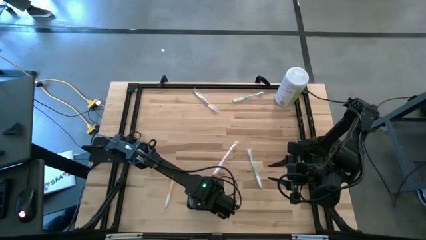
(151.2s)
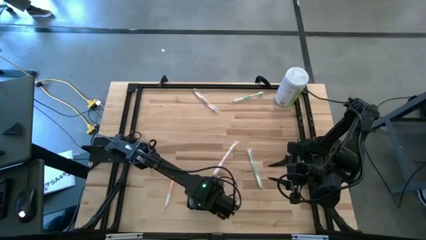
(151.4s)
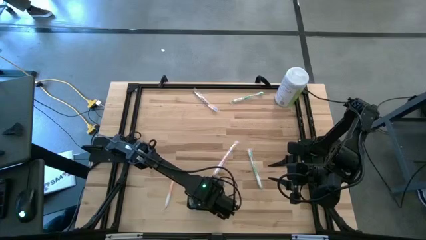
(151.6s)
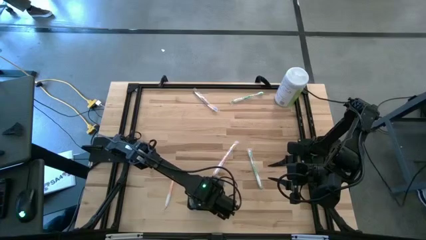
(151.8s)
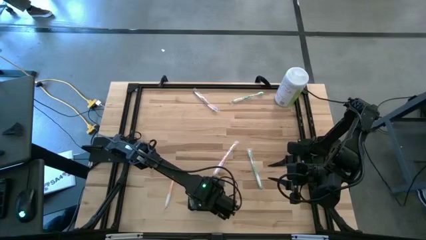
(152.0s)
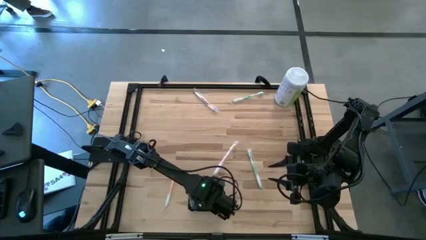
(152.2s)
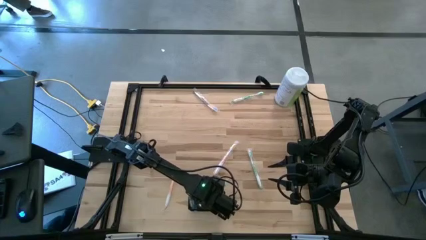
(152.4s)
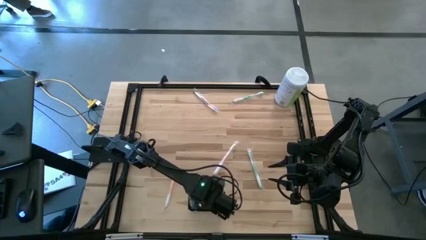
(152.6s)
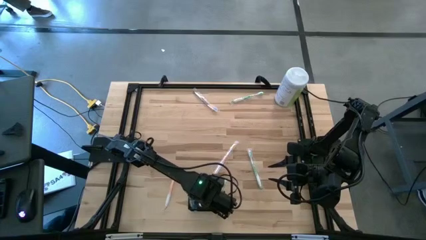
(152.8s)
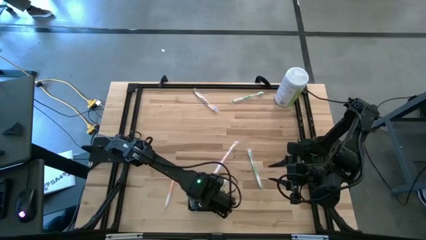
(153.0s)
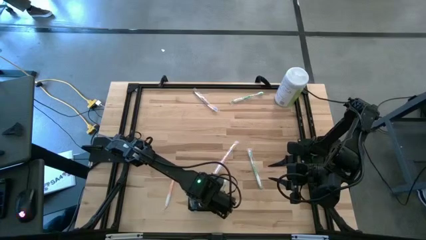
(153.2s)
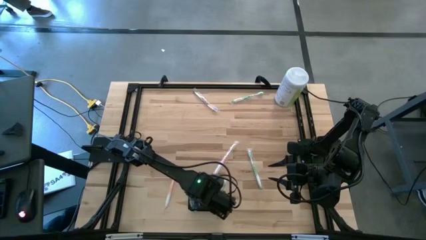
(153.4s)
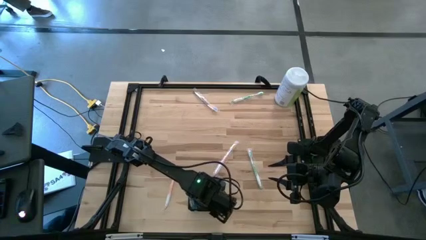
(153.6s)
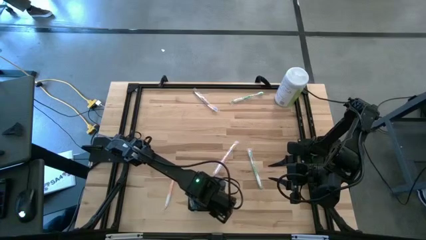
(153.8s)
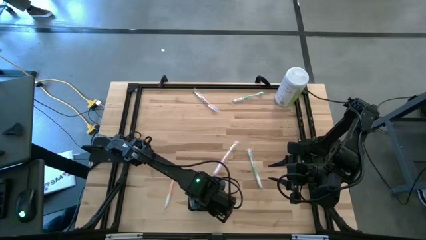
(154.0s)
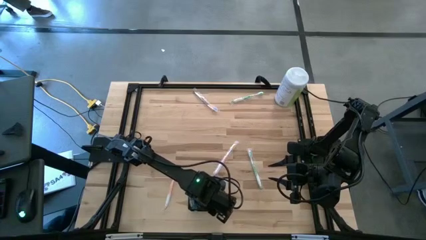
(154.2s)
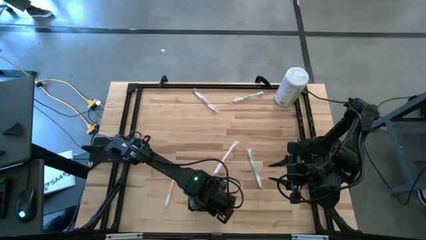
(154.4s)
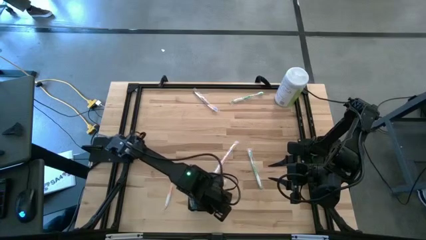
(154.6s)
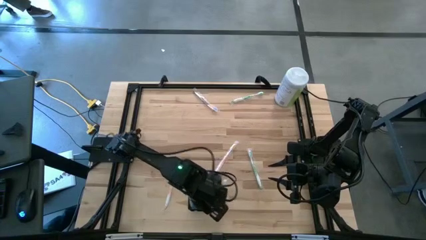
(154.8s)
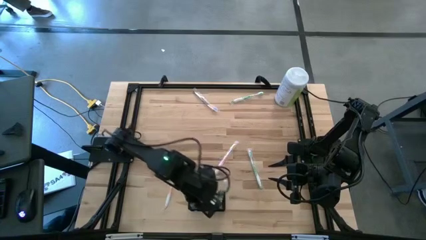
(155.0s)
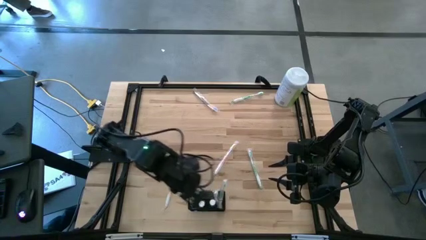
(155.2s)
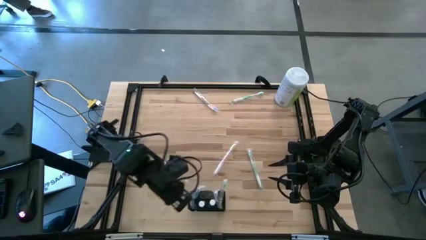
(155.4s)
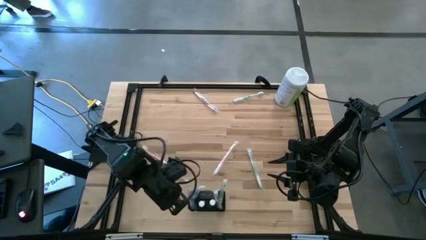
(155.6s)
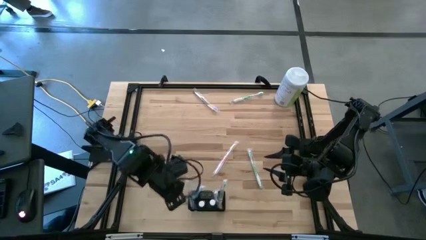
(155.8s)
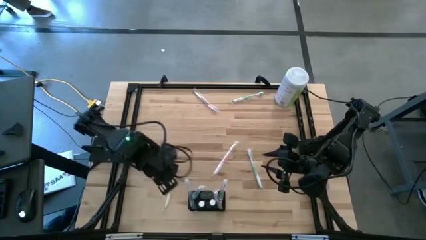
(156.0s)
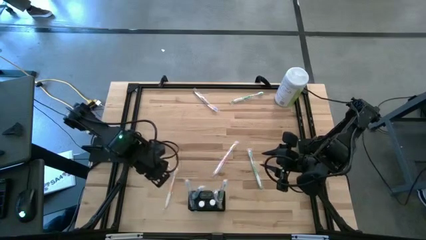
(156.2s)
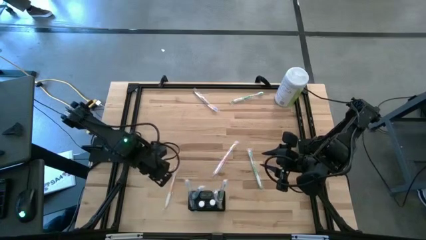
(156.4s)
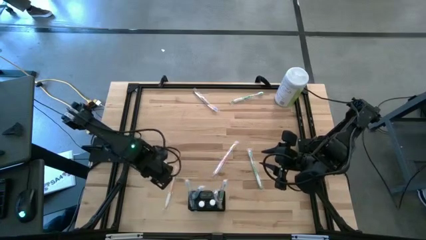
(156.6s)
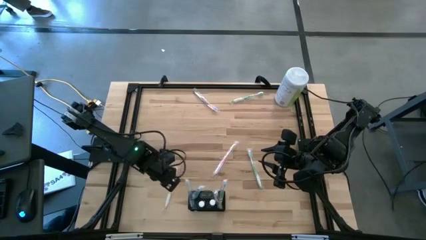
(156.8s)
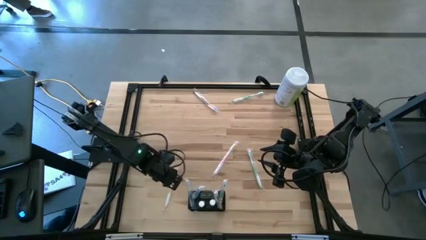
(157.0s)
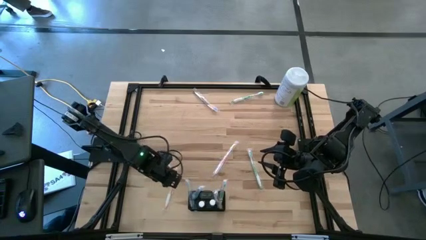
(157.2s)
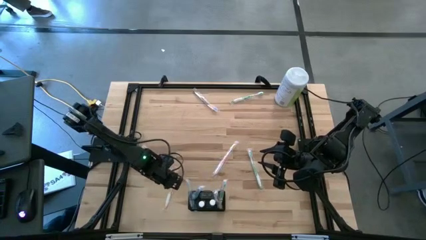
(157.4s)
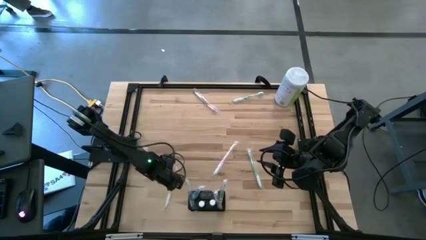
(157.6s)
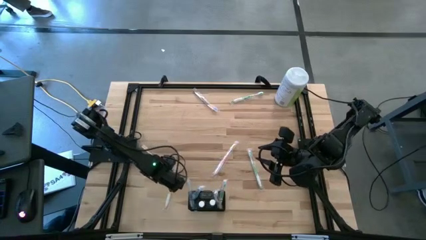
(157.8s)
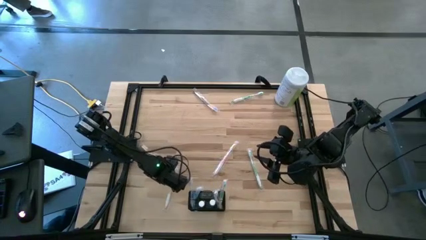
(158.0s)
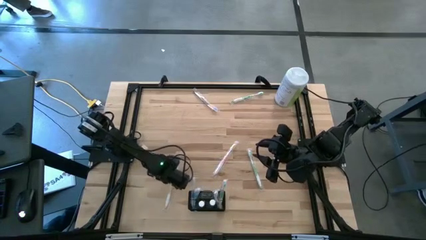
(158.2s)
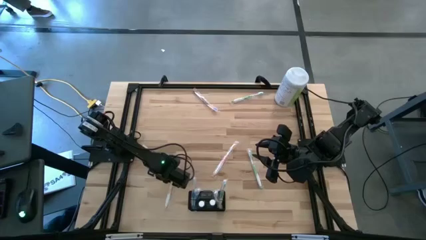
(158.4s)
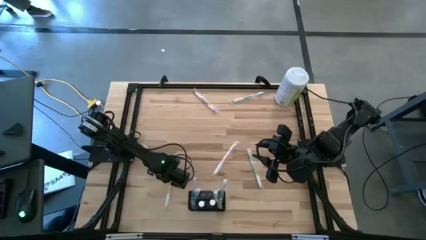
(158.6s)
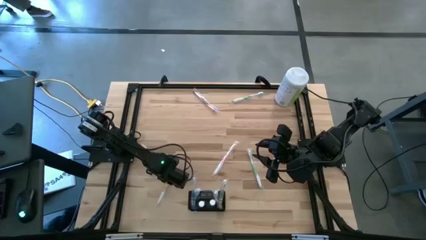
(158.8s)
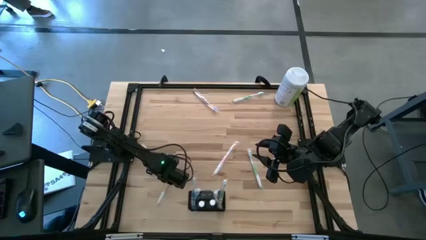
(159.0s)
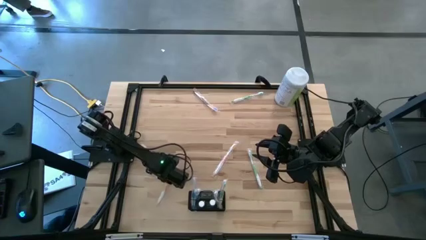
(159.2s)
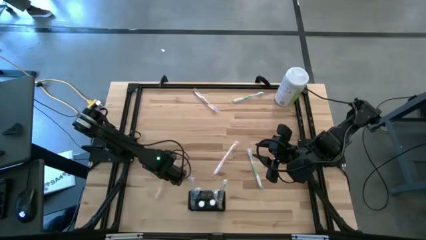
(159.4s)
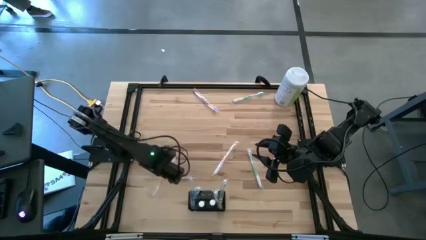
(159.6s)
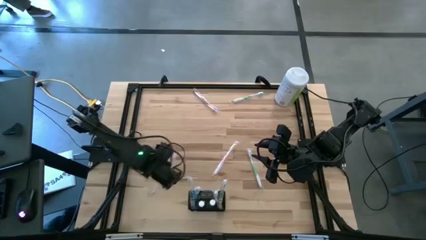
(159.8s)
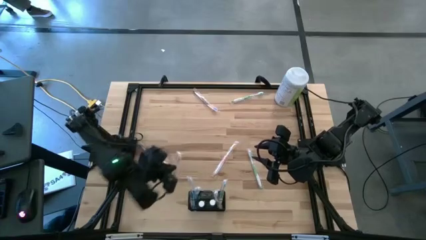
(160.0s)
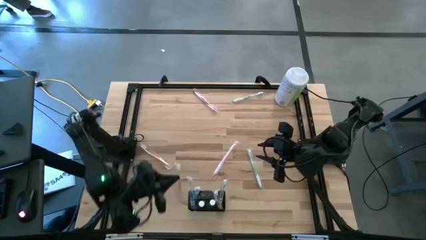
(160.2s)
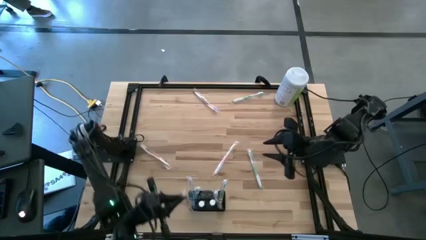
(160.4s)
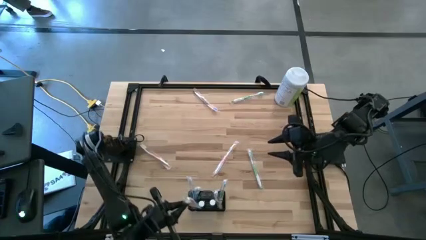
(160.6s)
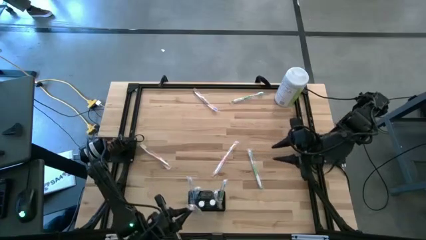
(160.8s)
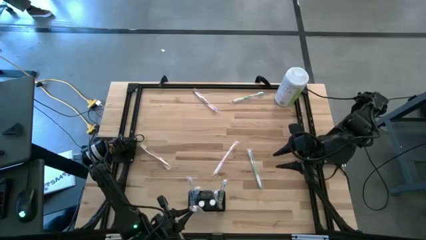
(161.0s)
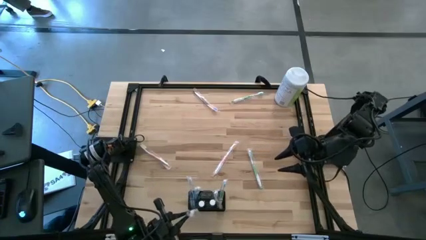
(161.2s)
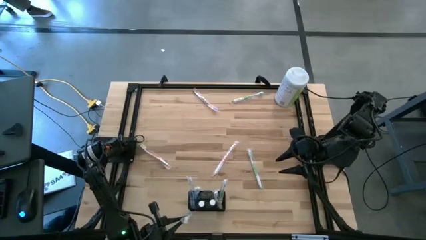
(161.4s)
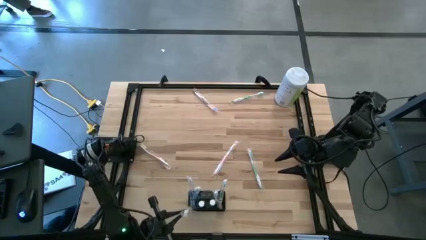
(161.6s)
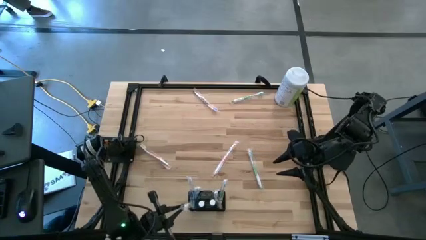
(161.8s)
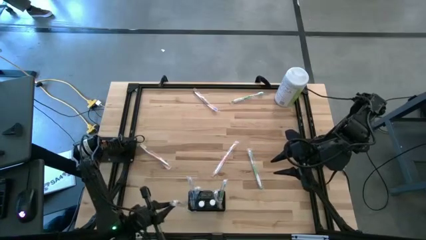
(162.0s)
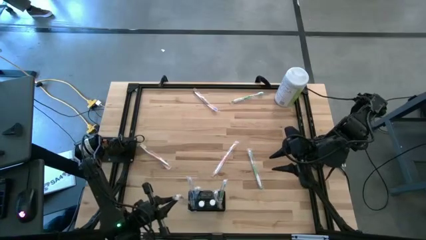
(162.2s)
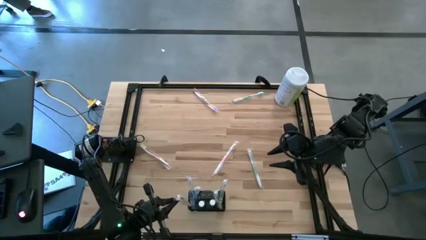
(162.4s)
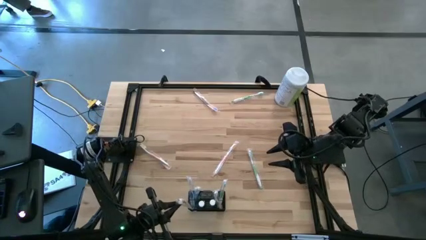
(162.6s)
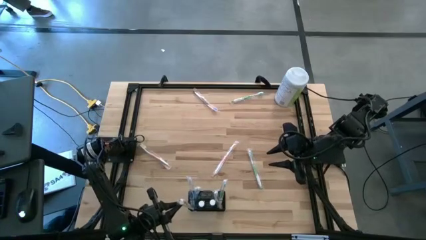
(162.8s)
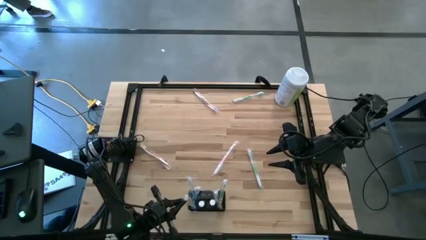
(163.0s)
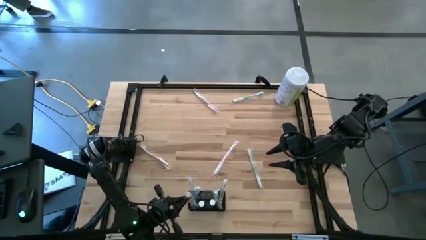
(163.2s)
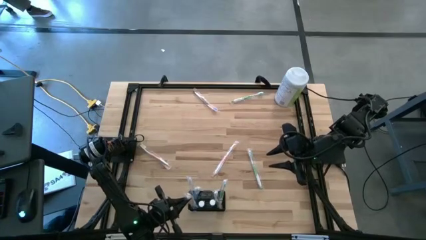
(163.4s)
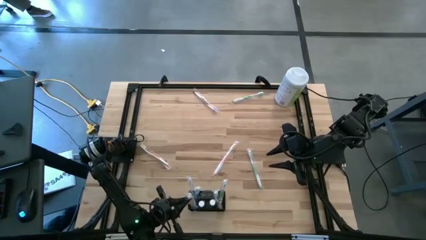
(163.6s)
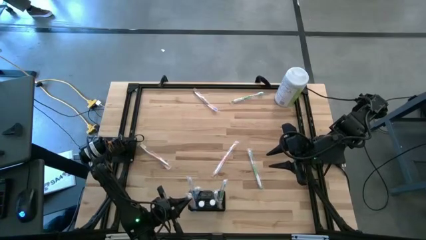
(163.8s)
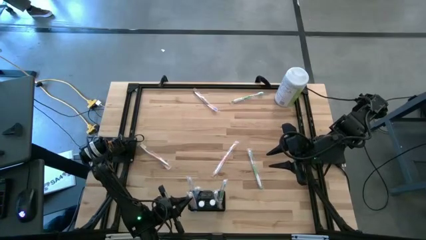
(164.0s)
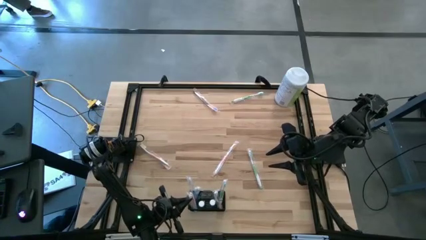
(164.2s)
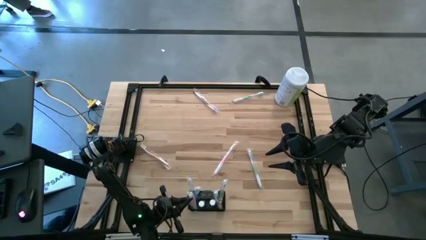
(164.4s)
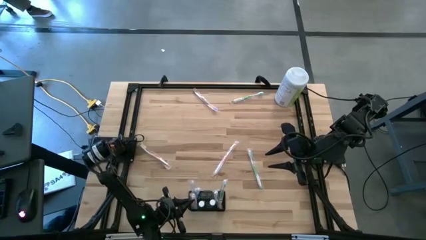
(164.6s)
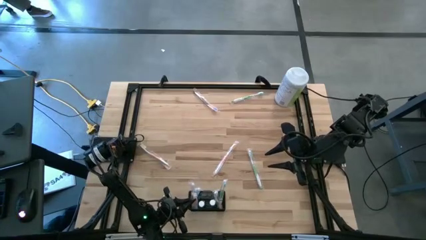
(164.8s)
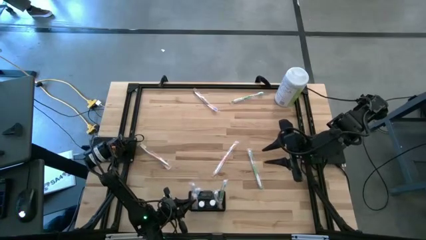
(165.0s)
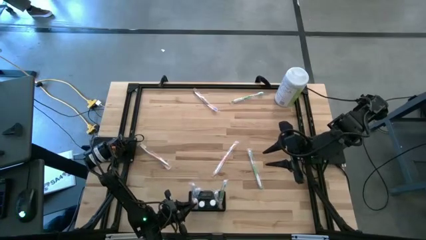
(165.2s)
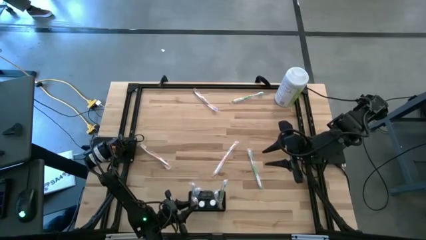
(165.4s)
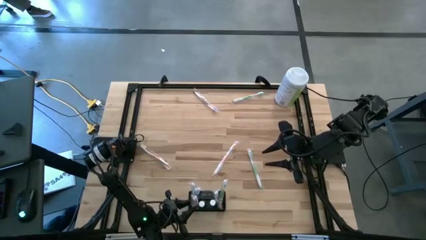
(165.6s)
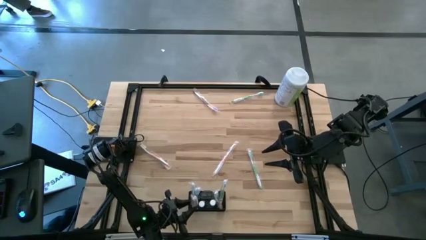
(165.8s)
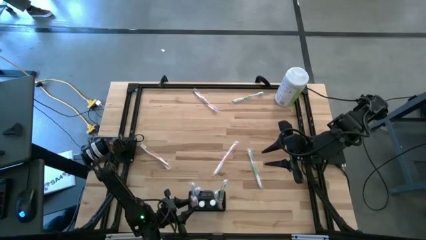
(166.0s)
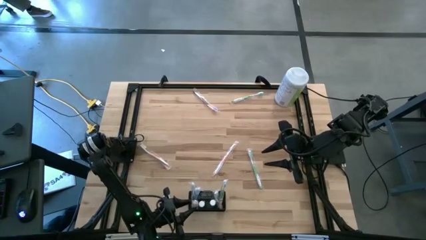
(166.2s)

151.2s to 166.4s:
Task: Pick & Place toothbrushing station
Put the bottom orange toothbrush into the black wire organizer

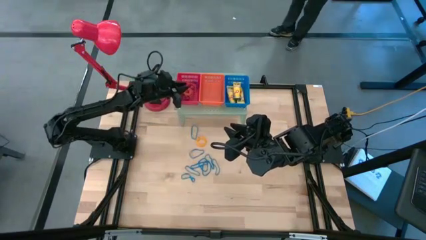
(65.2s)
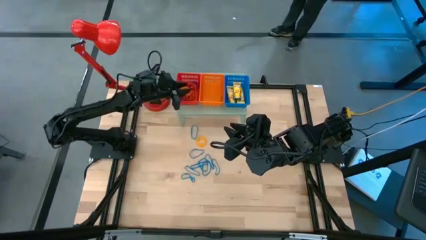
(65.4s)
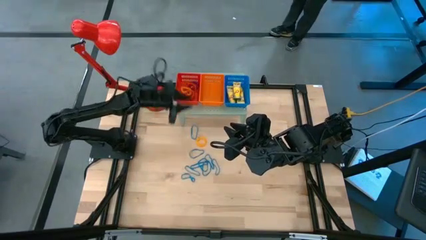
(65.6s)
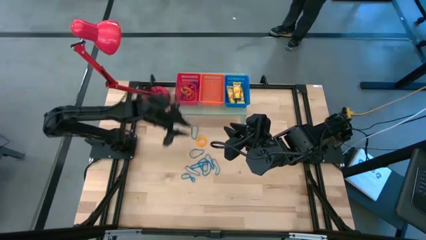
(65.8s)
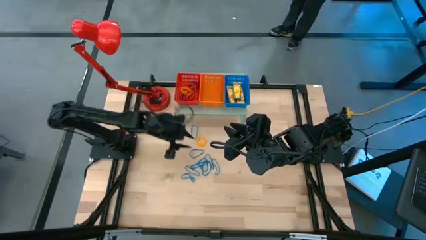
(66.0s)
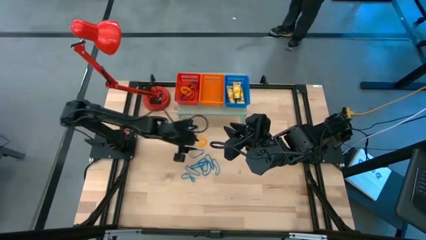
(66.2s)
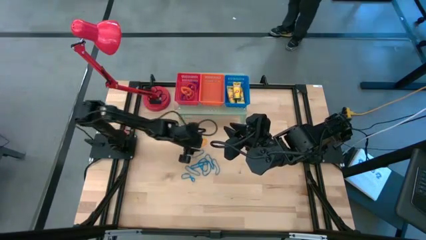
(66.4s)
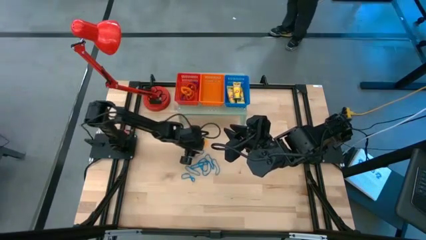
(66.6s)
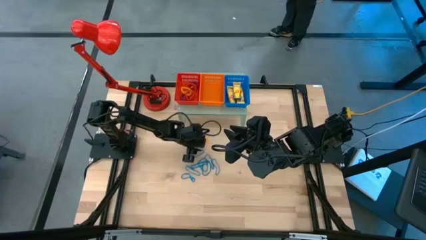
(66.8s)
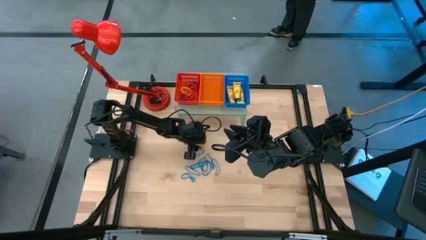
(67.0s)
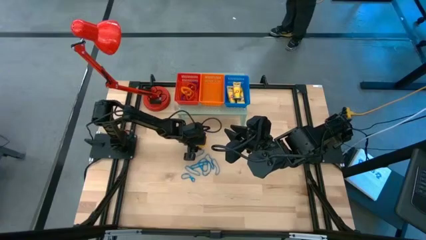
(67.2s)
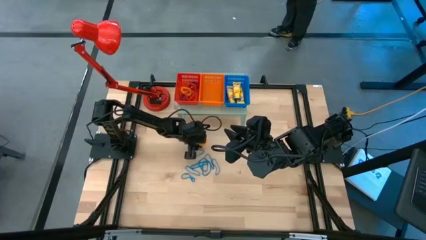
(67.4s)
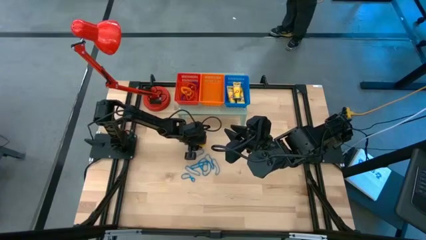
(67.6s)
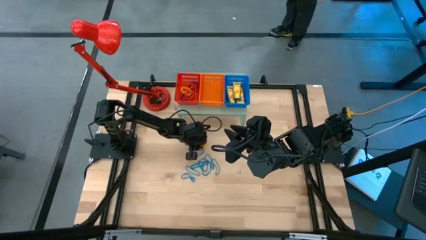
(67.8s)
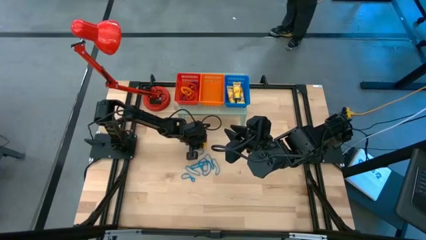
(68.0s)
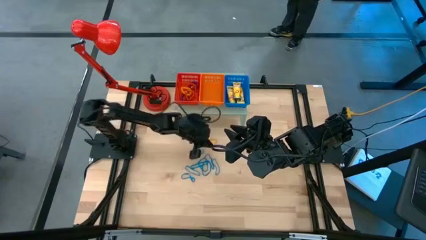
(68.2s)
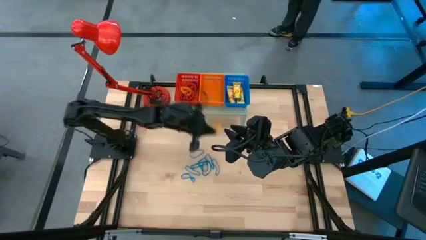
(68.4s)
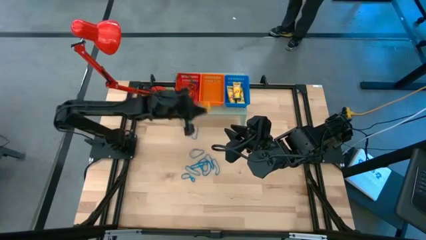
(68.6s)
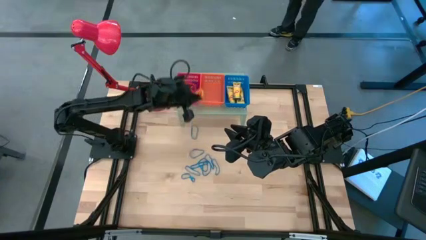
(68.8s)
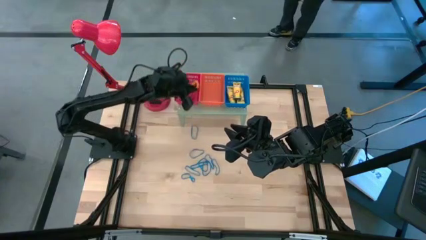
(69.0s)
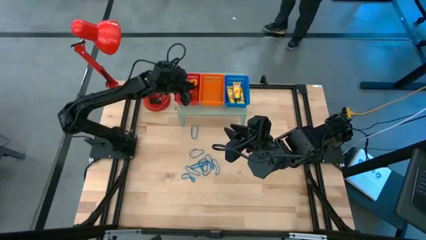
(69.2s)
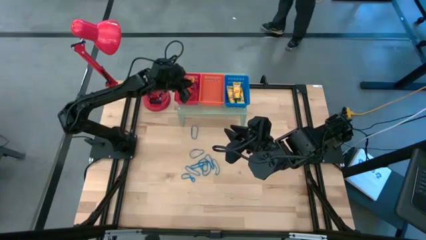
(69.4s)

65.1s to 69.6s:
Task: Pick & Place Office Desk Supplies
Put the yellow spring keychain into the red bin on the shelf
